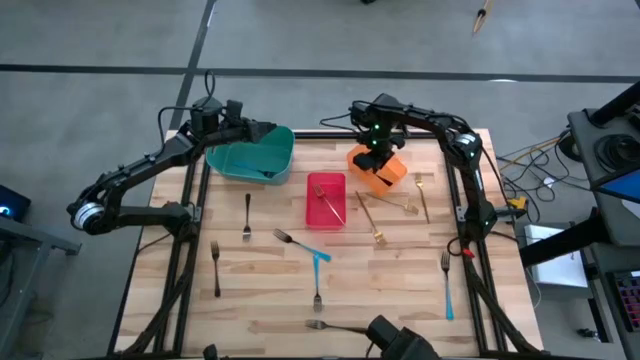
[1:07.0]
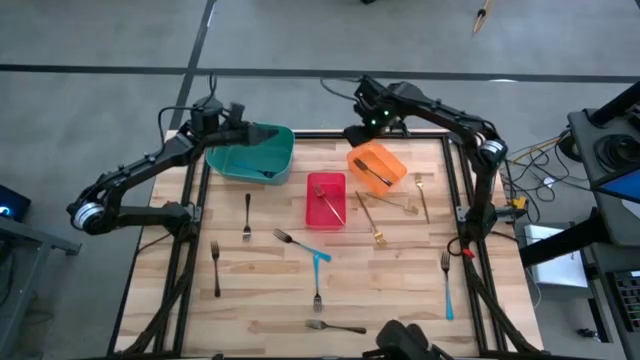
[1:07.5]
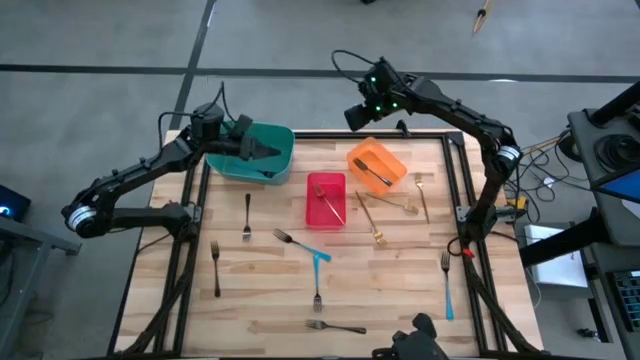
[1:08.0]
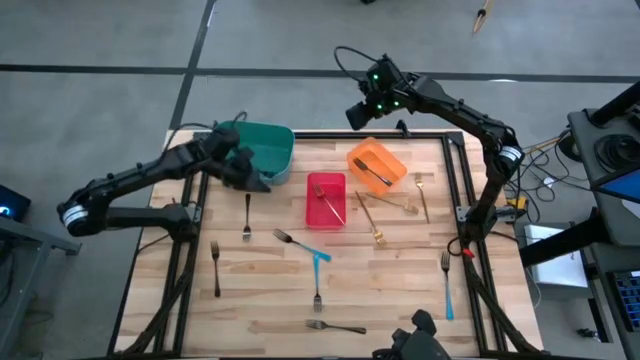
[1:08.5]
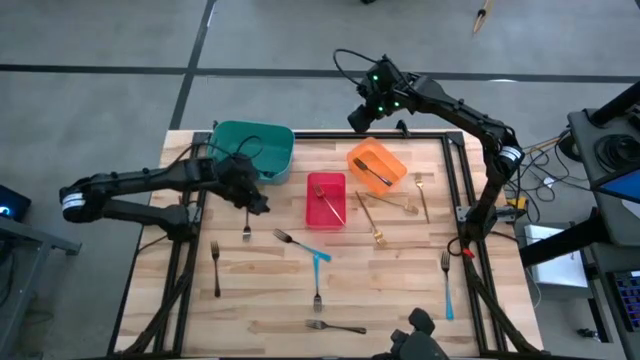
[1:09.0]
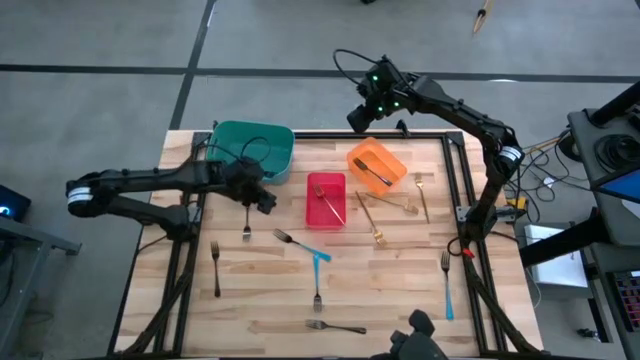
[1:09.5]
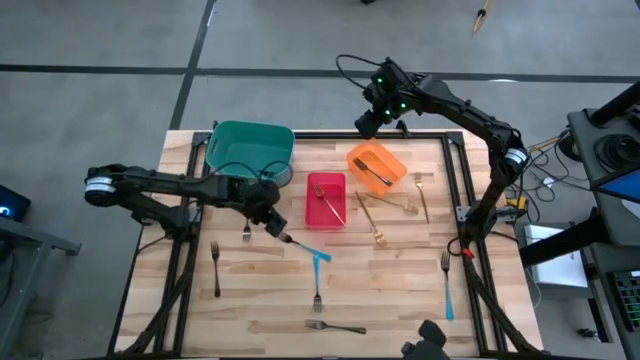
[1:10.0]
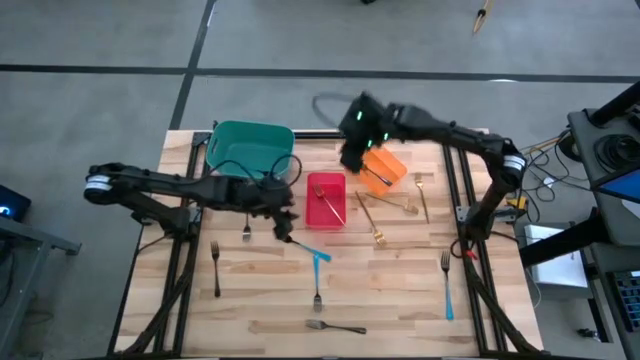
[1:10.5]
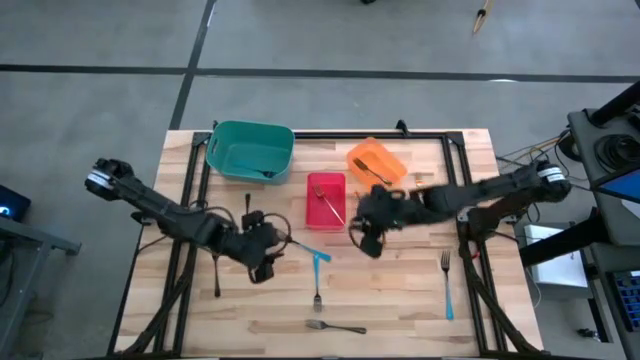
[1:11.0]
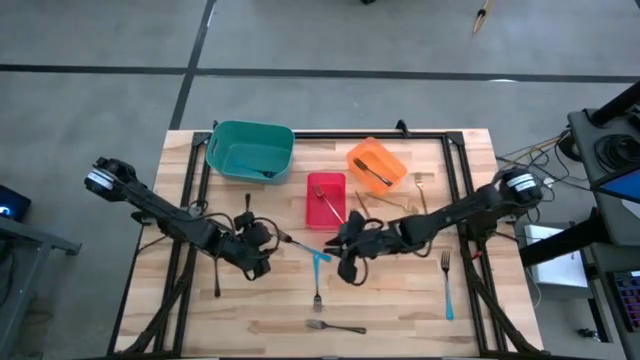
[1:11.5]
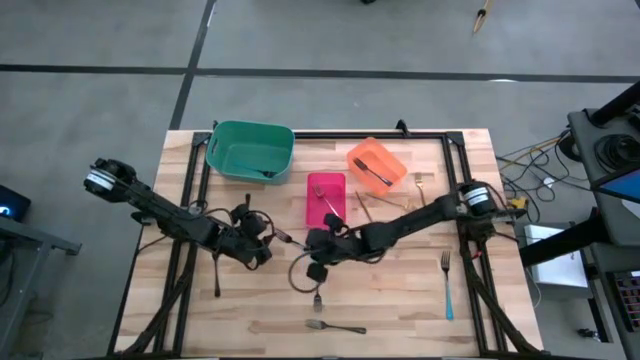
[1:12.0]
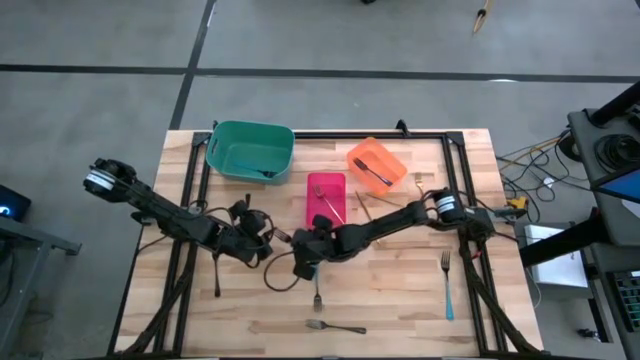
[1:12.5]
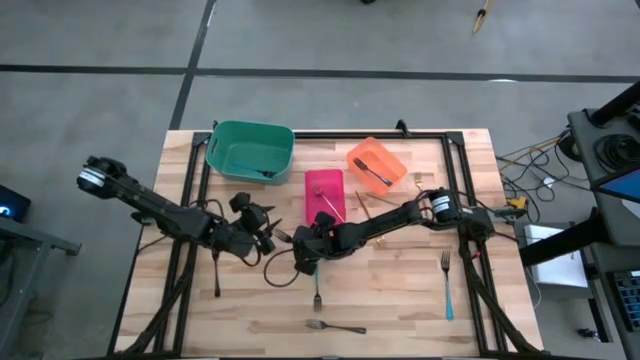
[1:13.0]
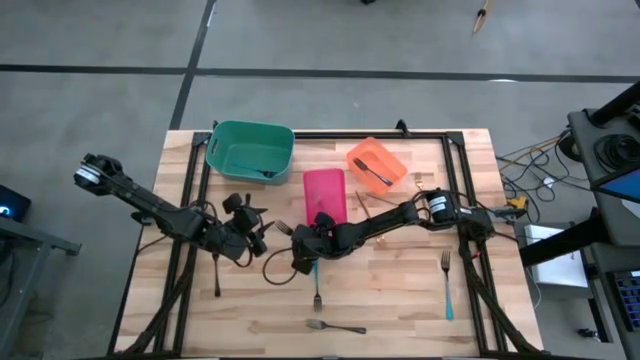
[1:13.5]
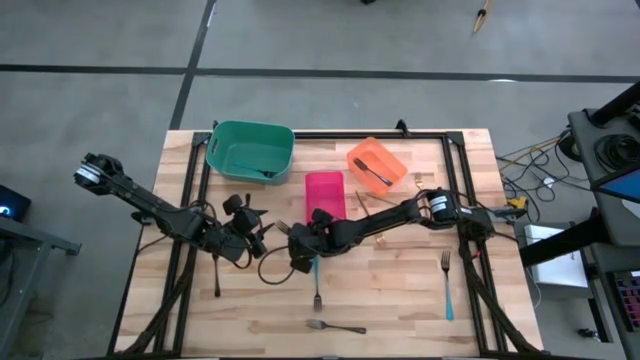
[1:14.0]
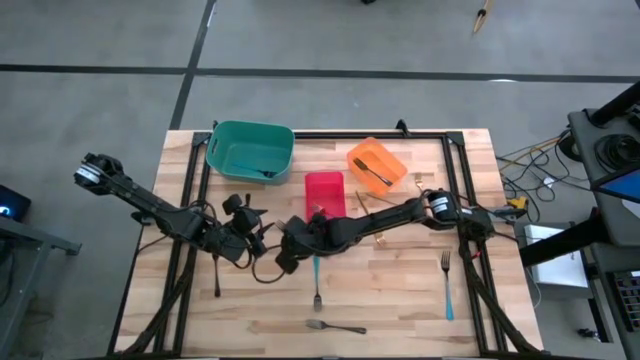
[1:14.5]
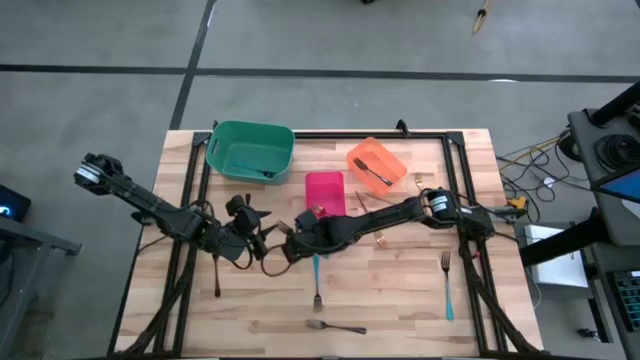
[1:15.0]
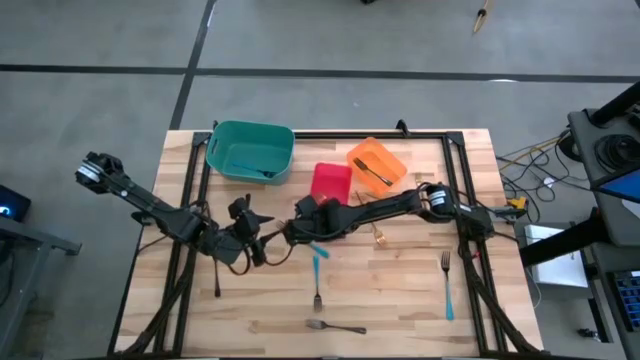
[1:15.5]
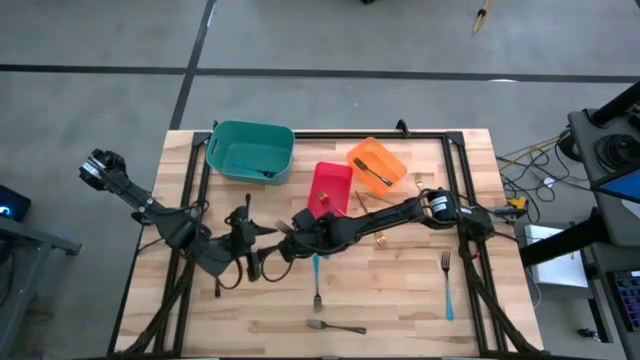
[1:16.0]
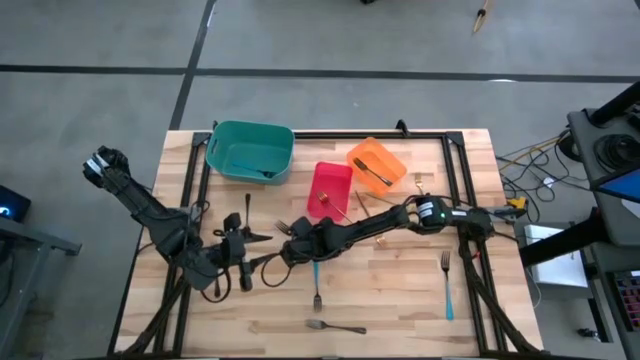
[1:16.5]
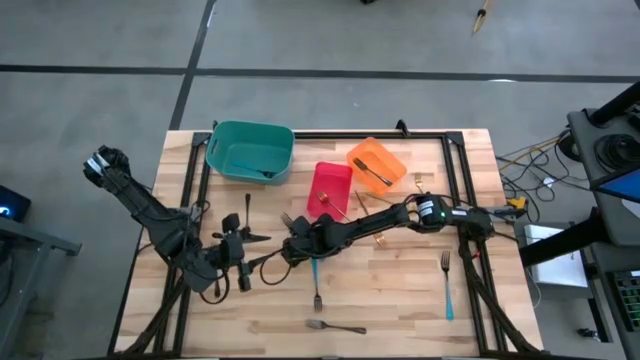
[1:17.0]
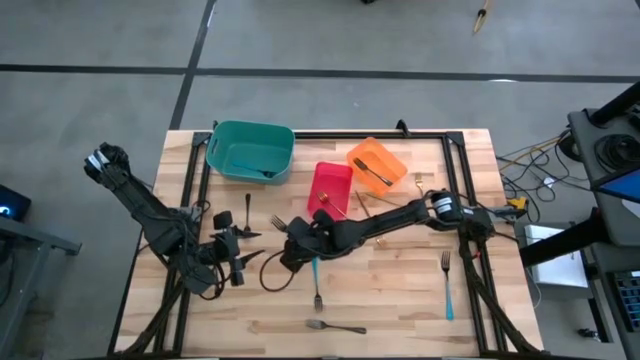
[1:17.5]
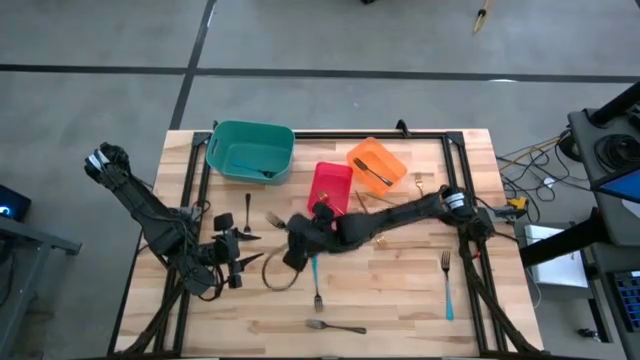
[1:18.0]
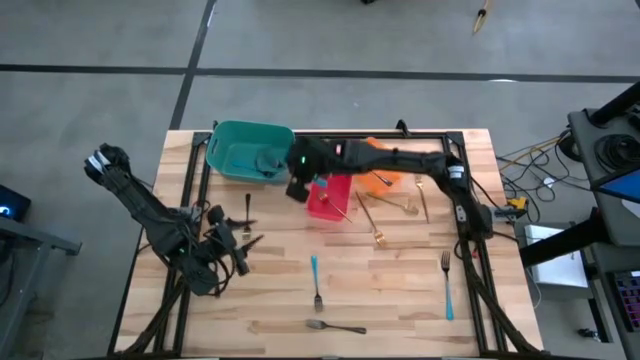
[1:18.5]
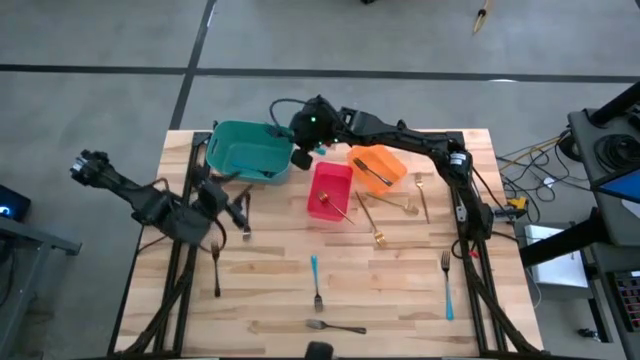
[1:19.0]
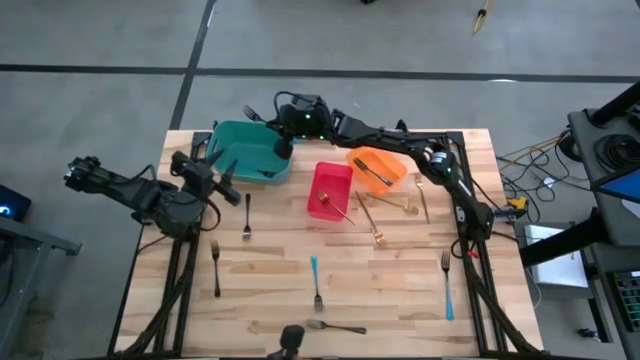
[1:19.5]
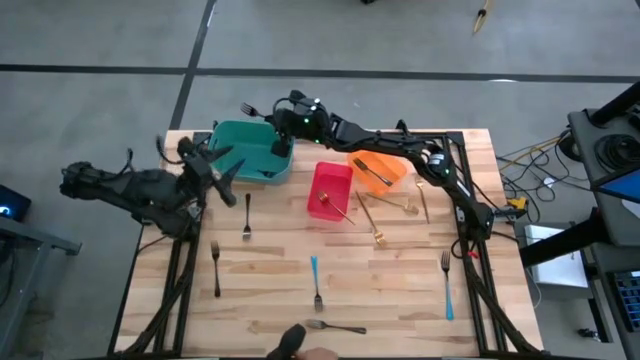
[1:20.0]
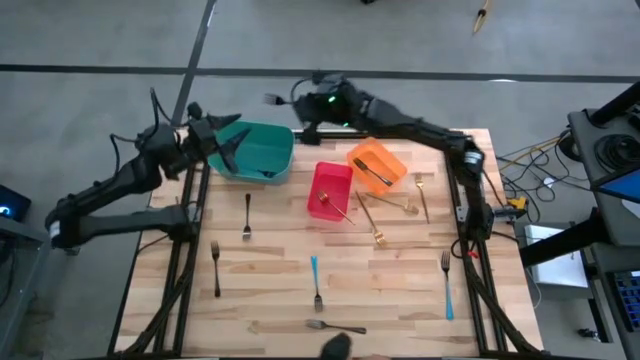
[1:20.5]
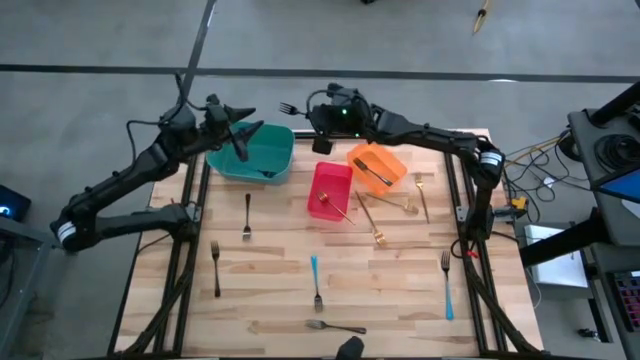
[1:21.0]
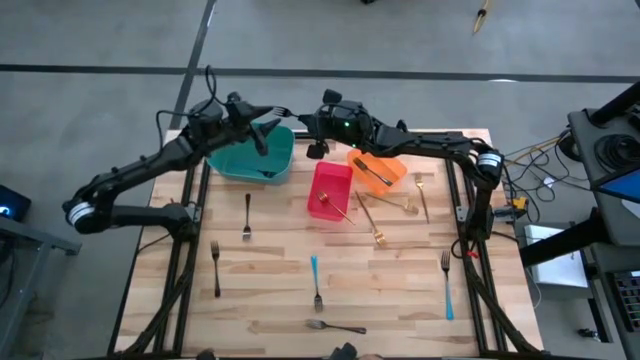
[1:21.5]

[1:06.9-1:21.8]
Task: Sort silverware by color (type)
Put the blue fork into the green bin

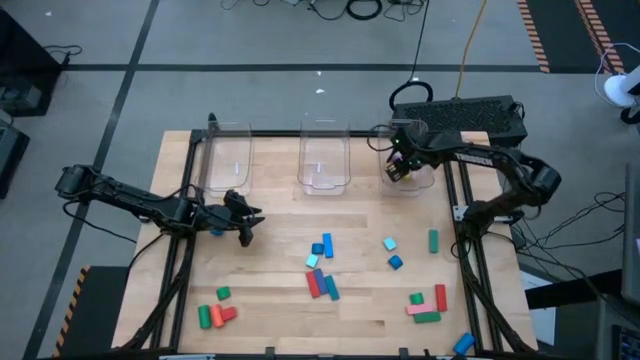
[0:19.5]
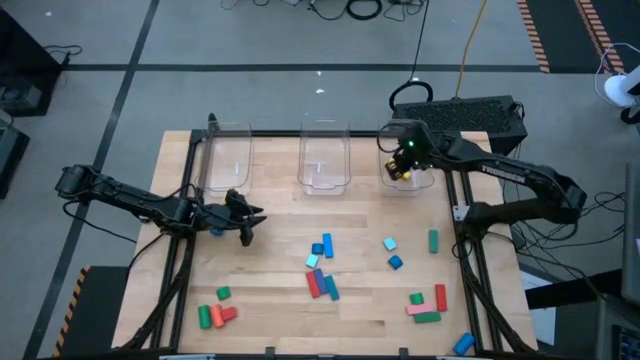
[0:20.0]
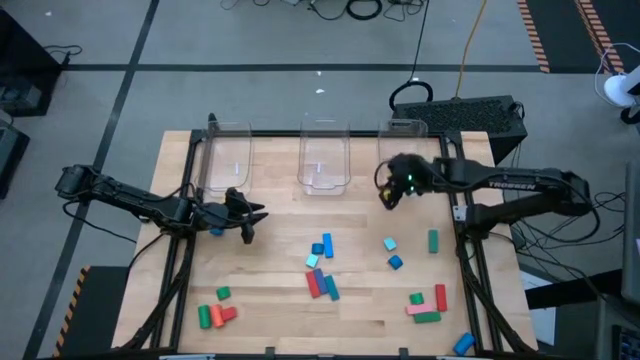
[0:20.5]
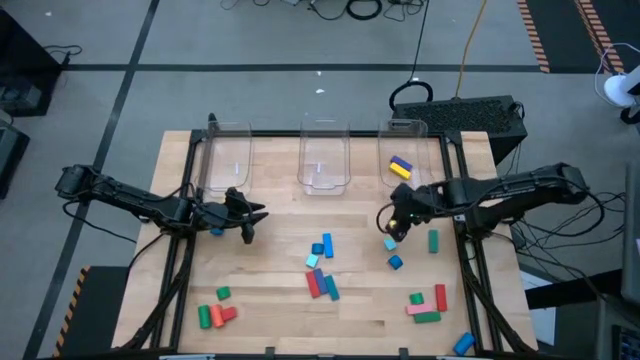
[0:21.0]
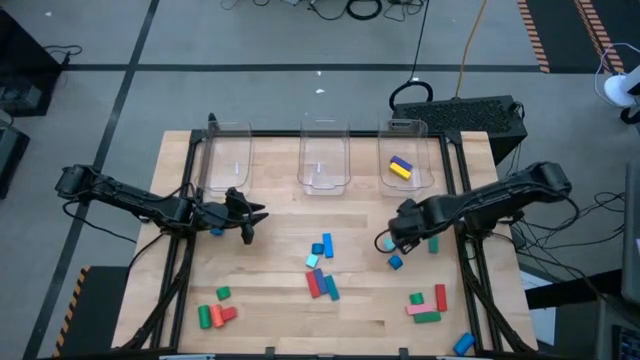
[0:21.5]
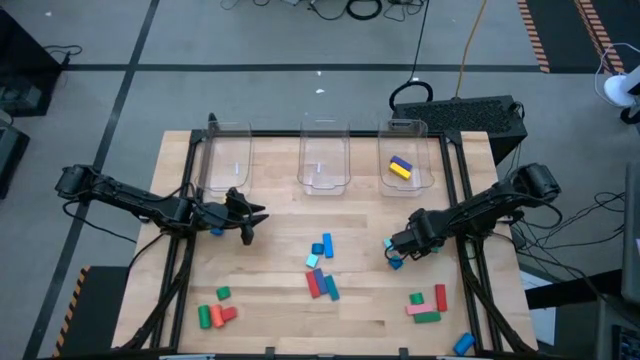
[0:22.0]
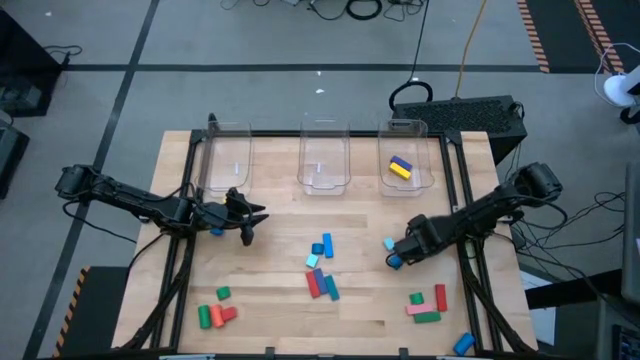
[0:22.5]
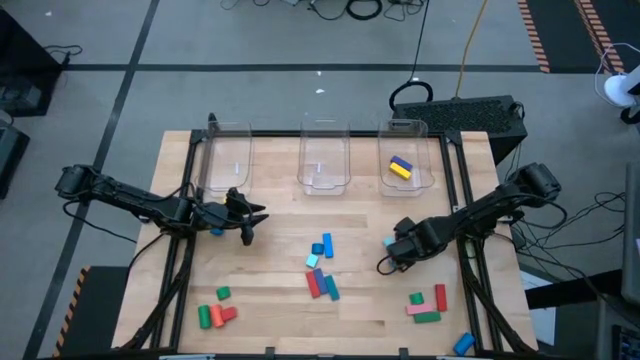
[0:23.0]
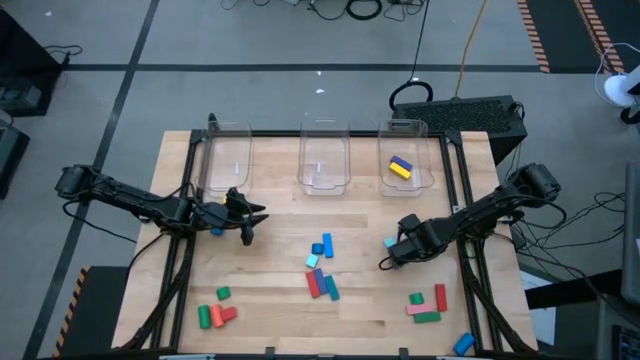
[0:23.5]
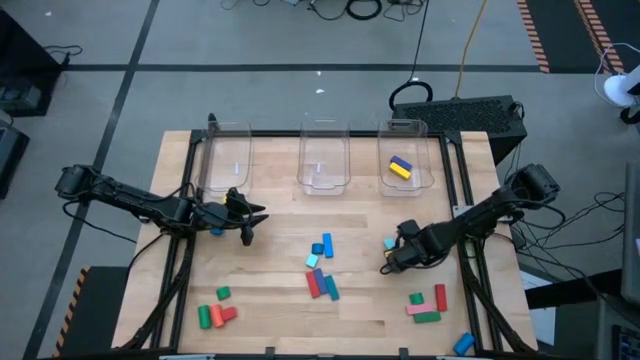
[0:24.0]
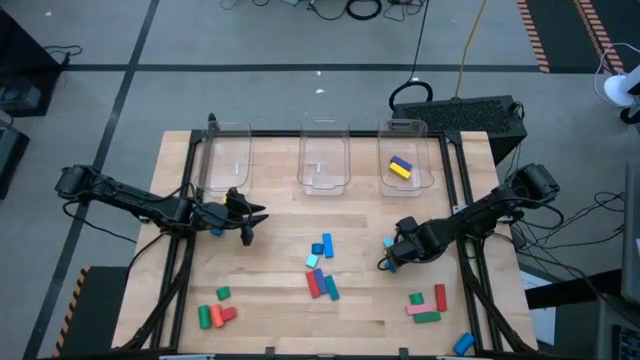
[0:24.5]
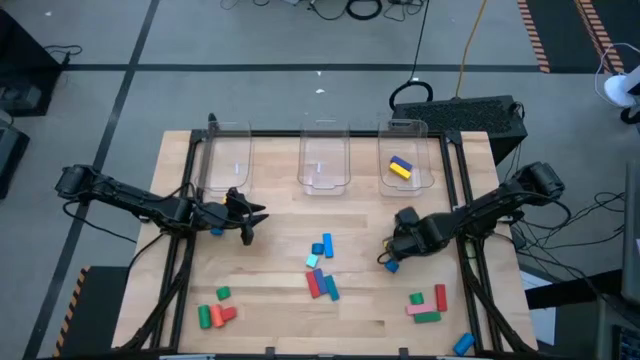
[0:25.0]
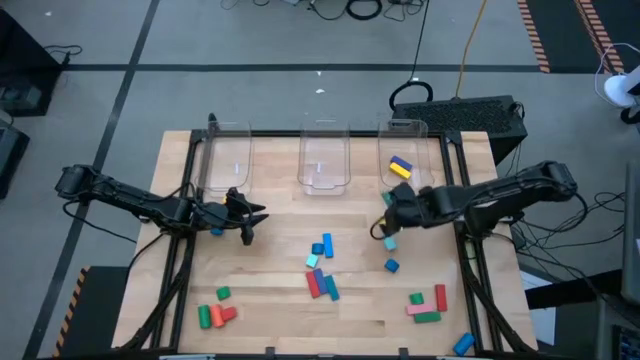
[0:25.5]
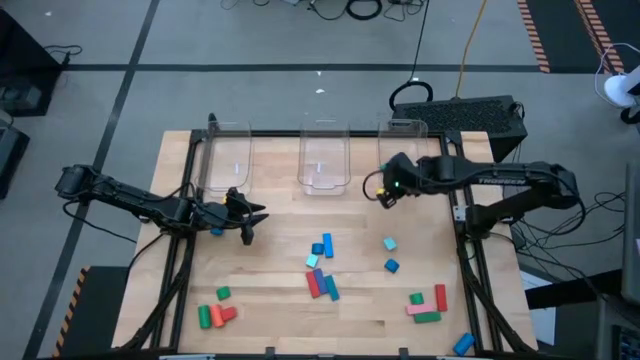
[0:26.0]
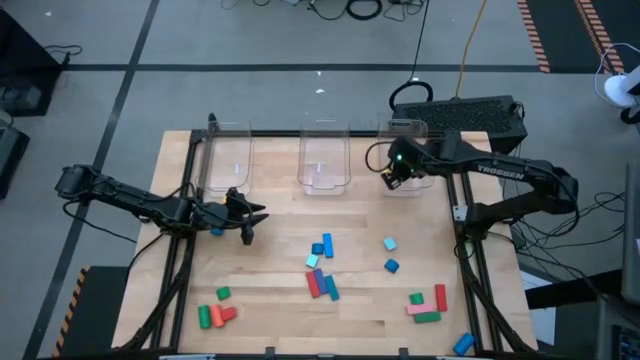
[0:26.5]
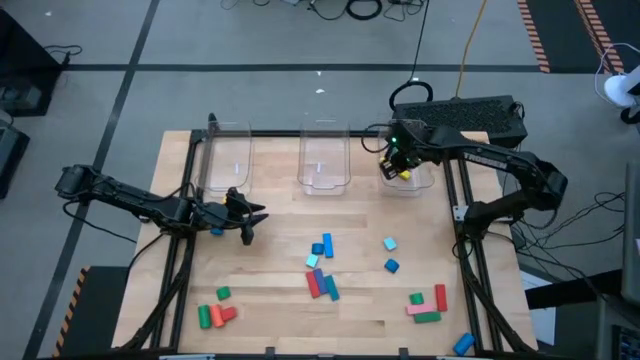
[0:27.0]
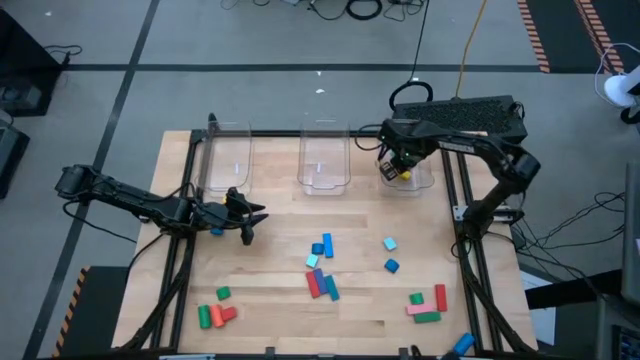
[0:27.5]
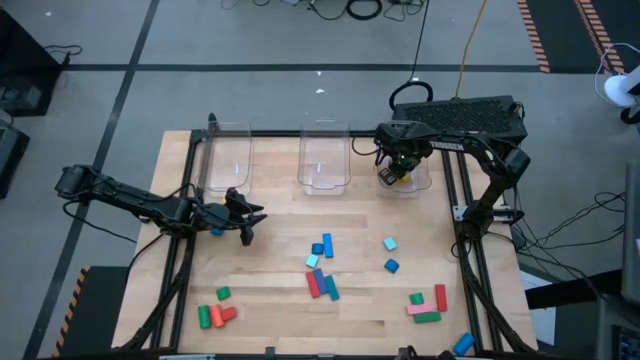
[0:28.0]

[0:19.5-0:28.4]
Task: Sort blocks by size
Put the green rectangular block into the right transparent bin
